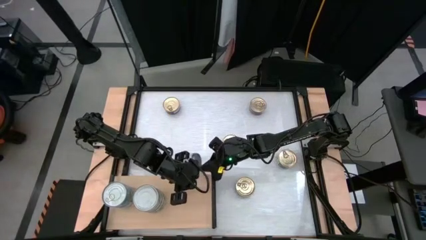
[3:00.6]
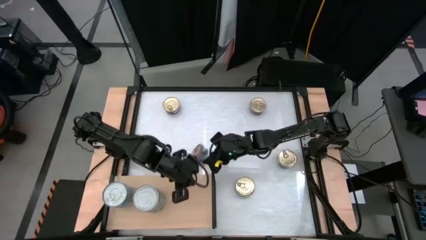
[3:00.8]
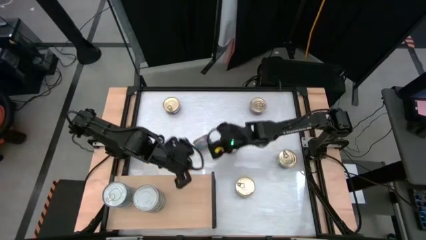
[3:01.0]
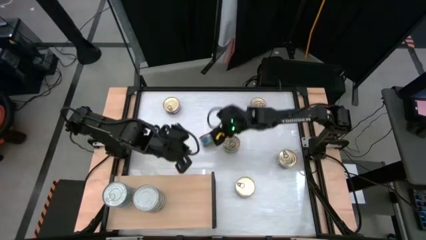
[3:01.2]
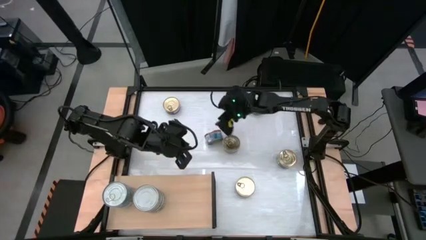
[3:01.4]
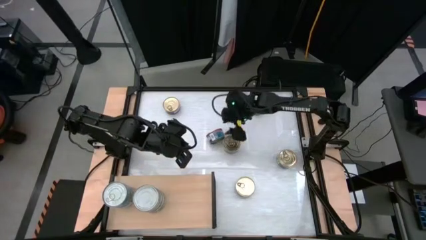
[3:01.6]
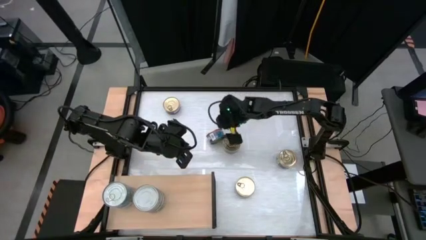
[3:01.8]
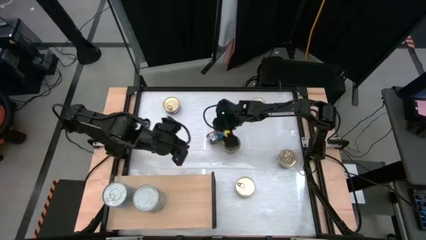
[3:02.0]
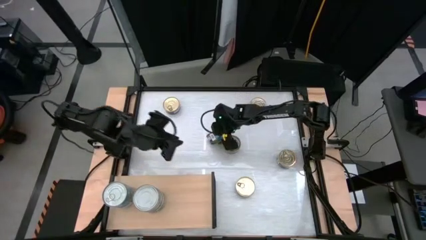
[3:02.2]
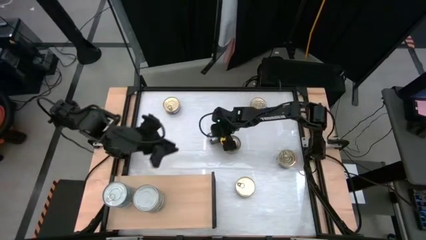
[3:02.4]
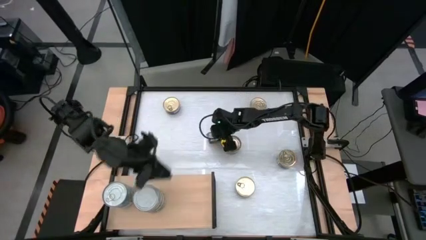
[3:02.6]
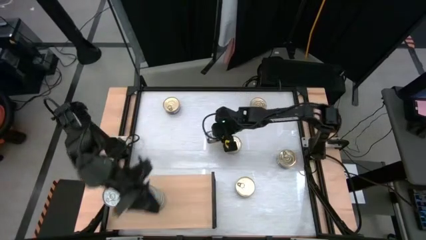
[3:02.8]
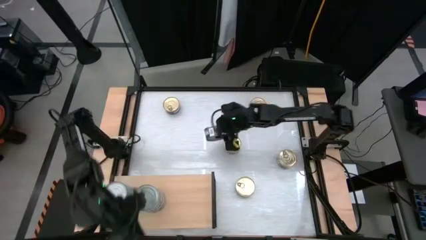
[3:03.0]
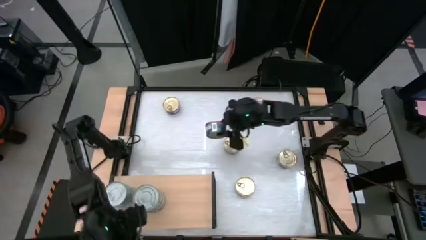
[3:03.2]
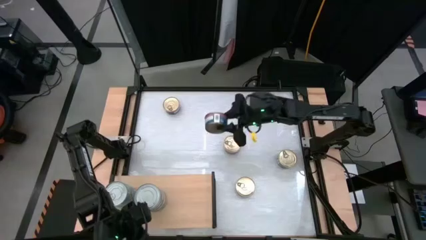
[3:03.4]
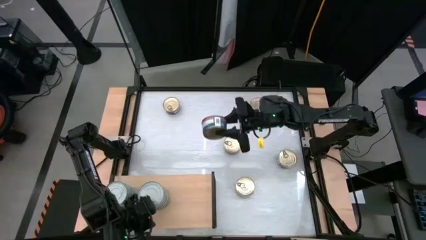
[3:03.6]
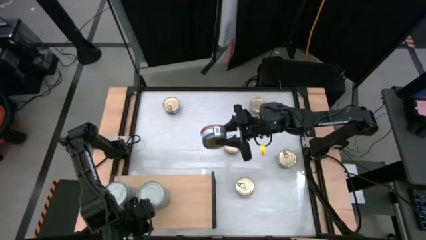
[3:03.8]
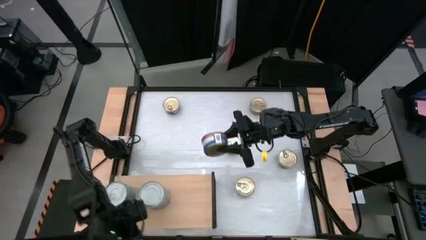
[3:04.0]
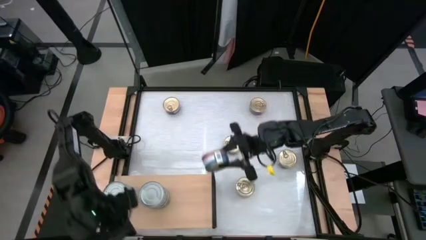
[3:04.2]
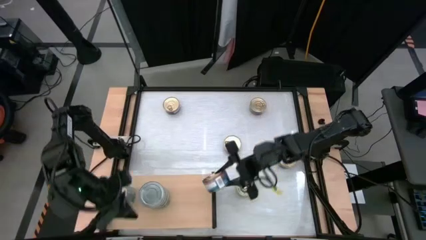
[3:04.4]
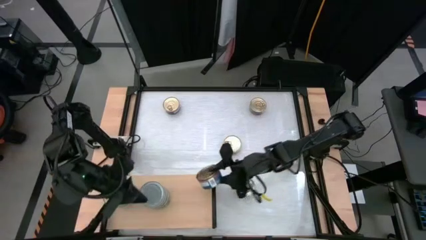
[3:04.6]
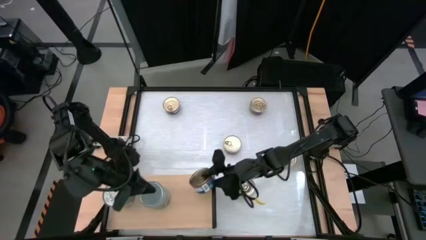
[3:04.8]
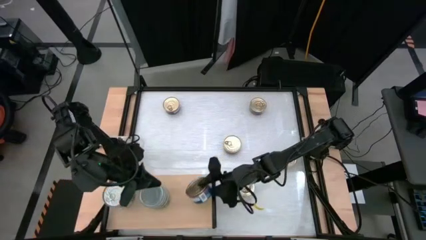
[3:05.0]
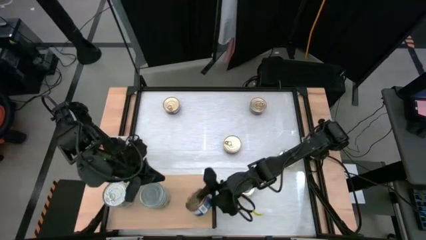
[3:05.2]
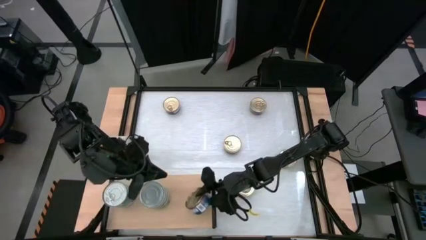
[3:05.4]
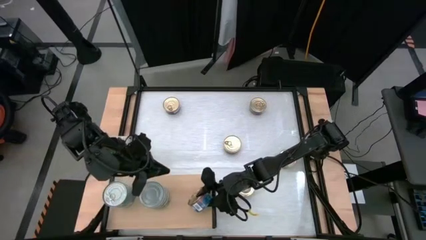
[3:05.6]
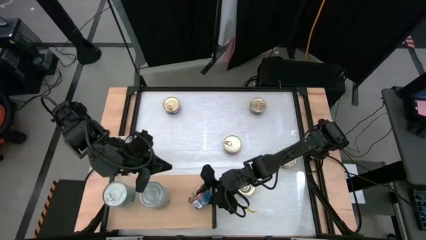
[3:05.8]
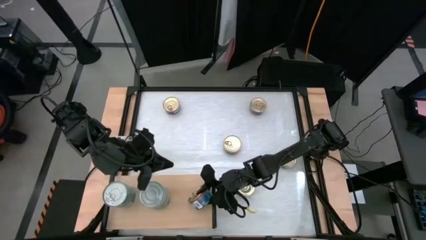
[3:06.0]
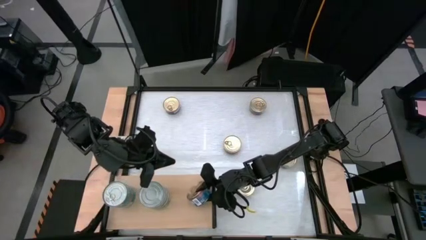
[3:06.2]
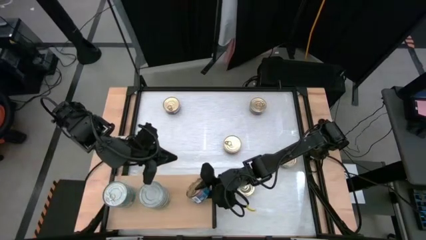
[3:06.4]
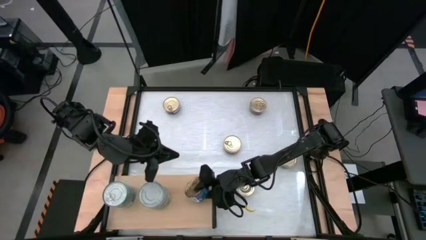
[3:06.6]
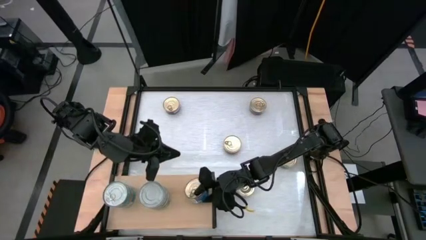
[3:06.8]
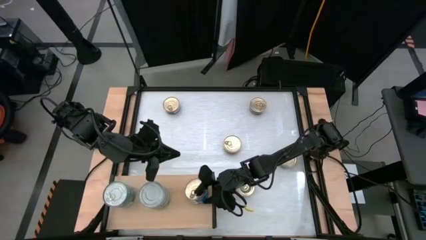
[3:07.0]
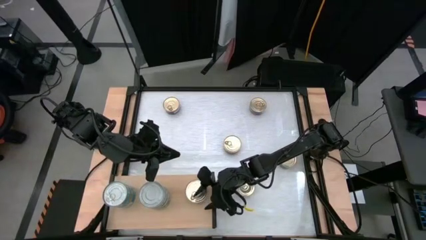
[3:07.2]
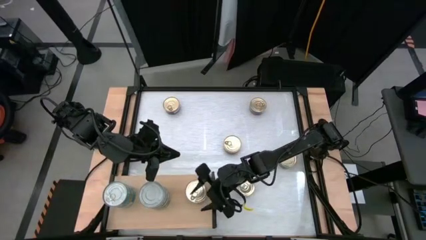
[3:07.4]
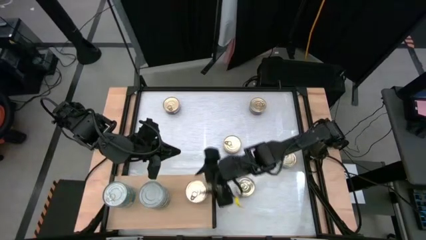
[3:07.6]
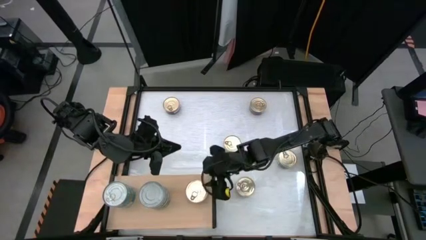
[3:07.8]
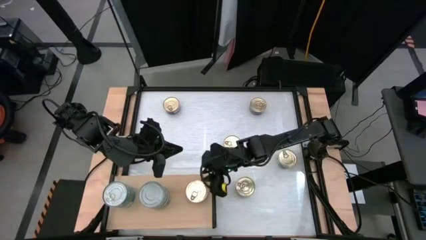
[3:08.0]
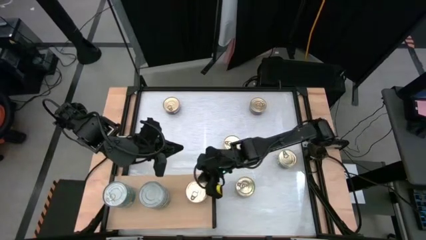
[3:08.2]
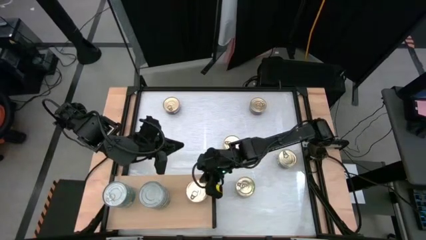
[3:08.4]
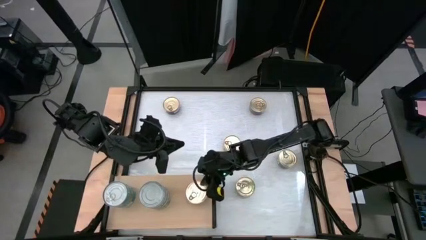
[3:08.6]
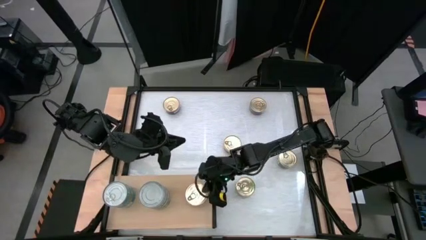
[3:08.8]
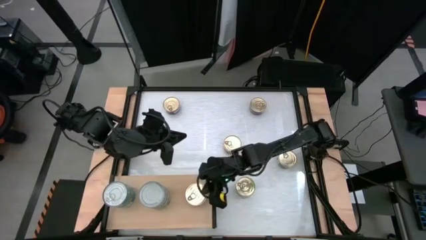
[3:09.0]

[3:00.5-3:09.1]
Task: Stack canned seafood by type on shelf
Put the blue pink tuna can on the shelf

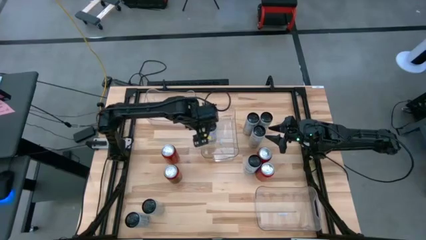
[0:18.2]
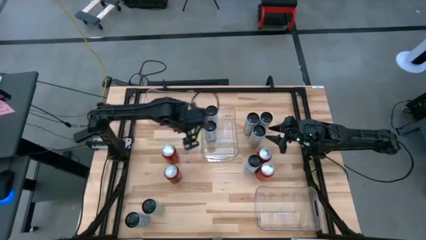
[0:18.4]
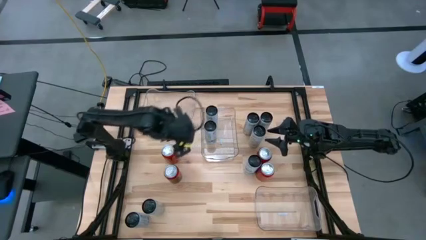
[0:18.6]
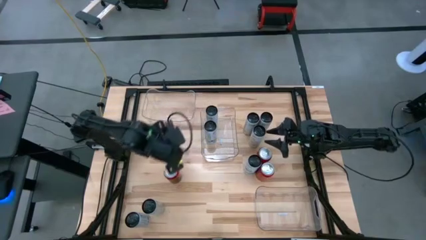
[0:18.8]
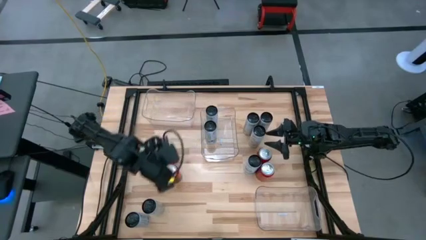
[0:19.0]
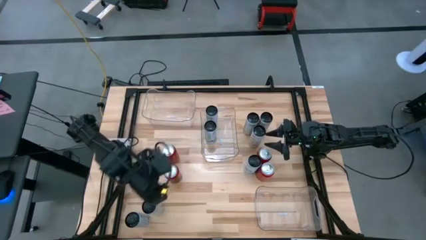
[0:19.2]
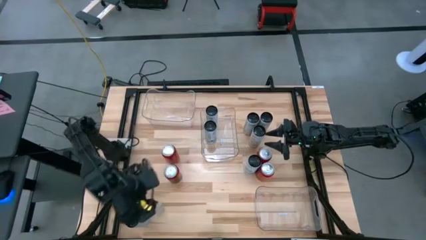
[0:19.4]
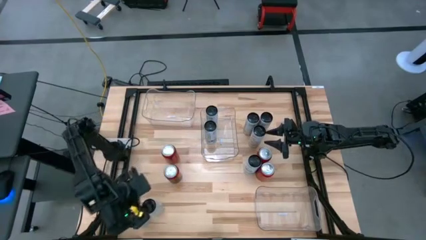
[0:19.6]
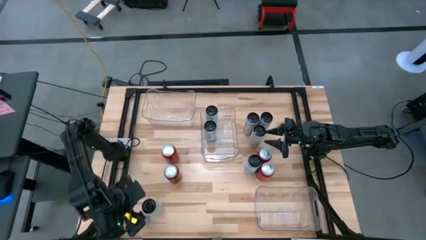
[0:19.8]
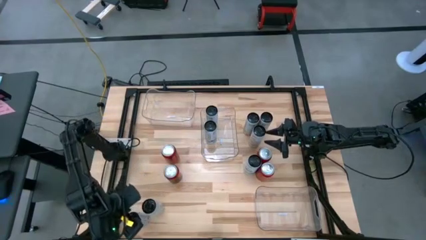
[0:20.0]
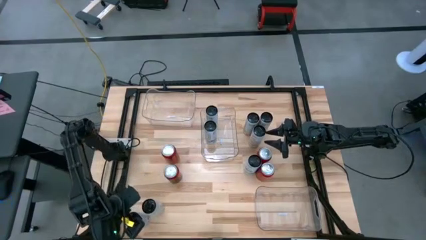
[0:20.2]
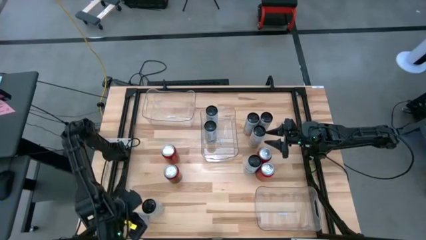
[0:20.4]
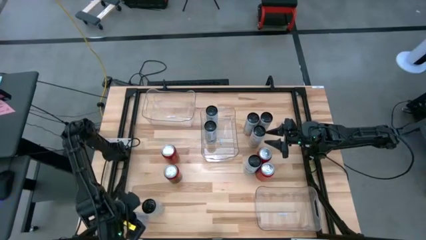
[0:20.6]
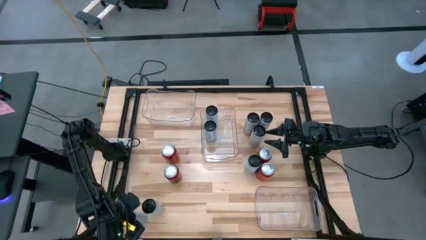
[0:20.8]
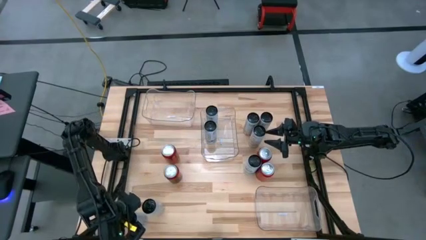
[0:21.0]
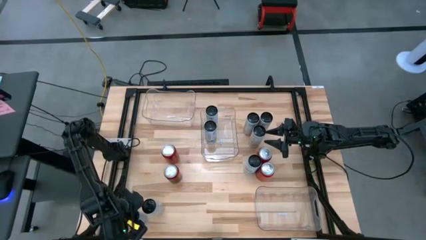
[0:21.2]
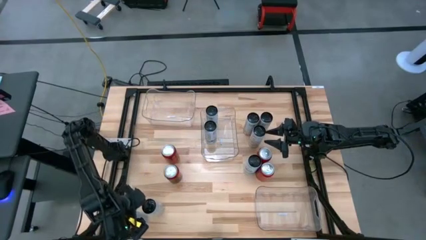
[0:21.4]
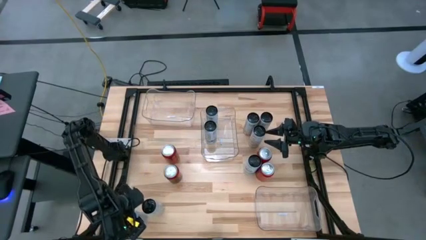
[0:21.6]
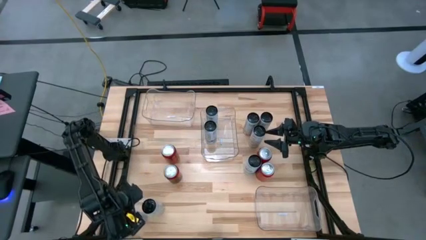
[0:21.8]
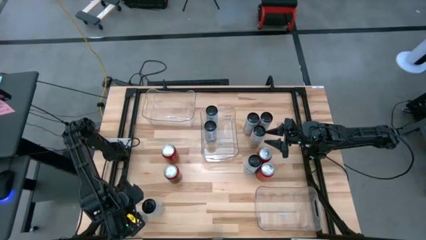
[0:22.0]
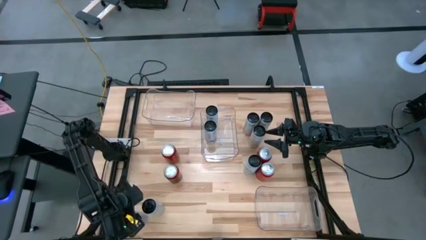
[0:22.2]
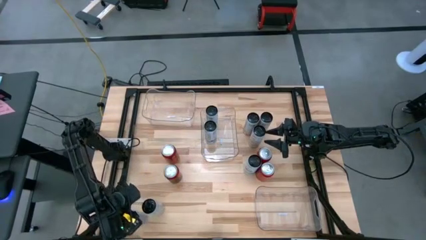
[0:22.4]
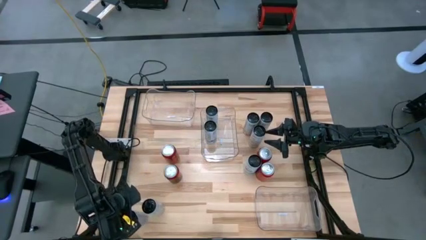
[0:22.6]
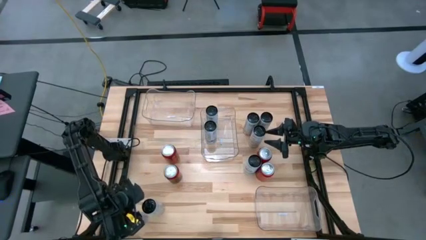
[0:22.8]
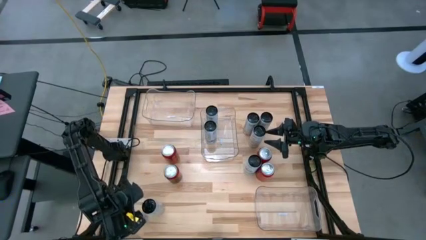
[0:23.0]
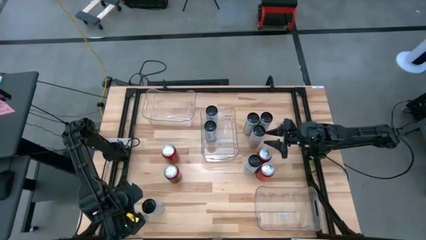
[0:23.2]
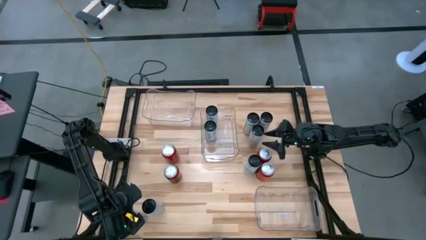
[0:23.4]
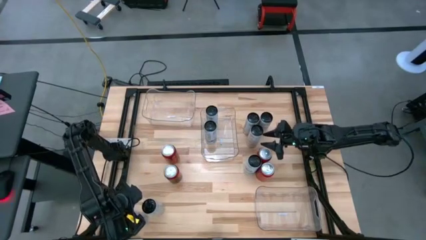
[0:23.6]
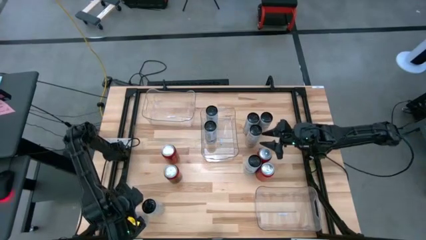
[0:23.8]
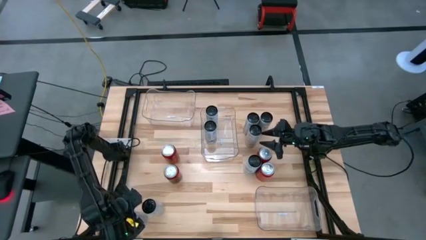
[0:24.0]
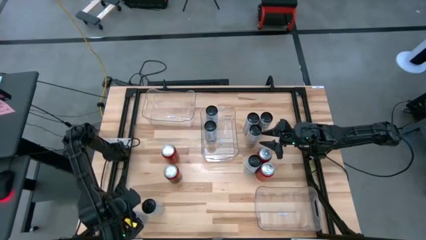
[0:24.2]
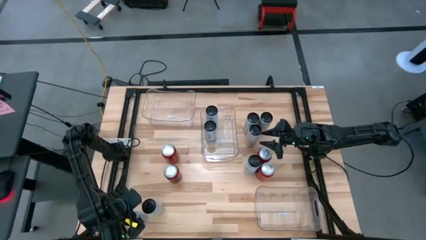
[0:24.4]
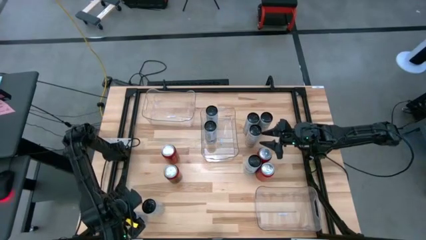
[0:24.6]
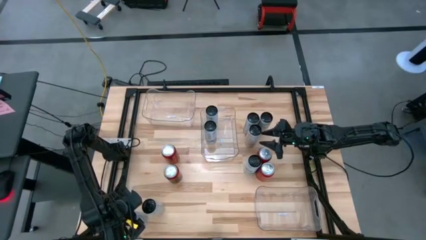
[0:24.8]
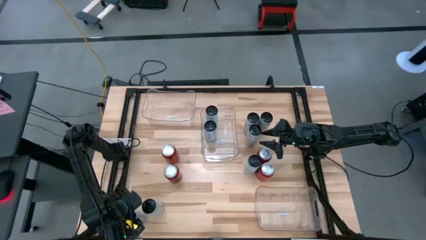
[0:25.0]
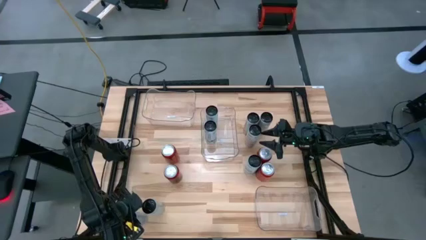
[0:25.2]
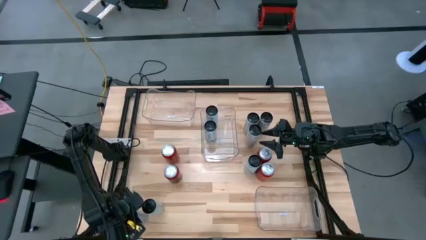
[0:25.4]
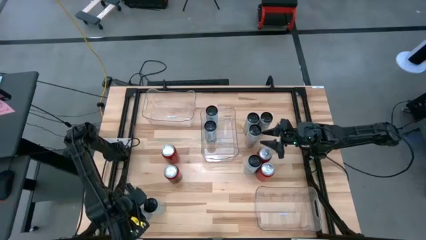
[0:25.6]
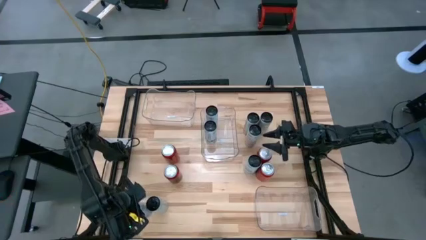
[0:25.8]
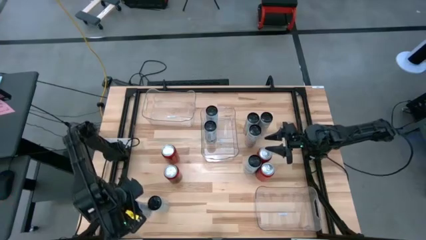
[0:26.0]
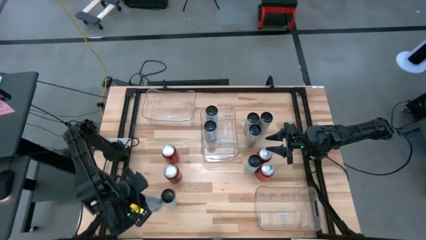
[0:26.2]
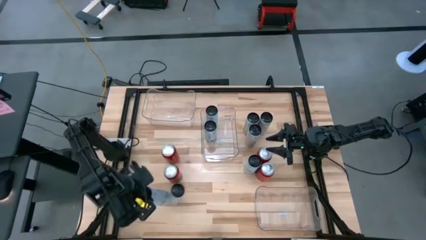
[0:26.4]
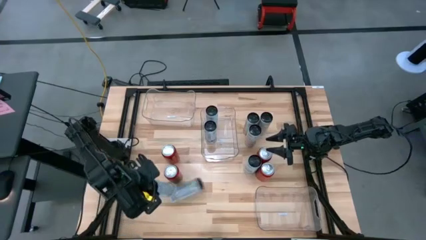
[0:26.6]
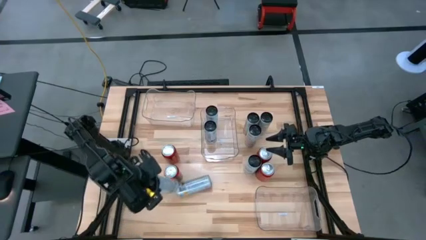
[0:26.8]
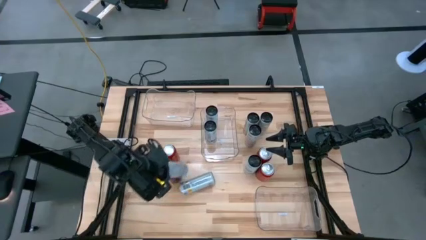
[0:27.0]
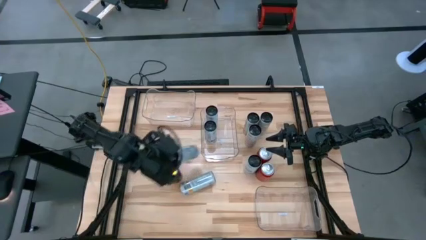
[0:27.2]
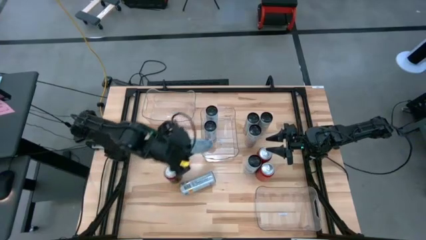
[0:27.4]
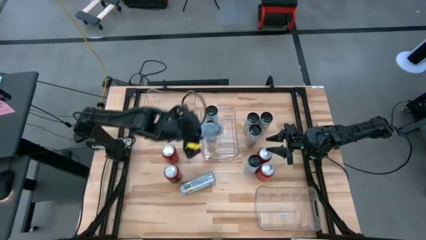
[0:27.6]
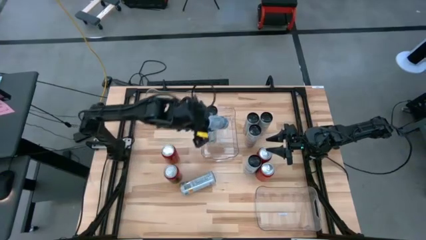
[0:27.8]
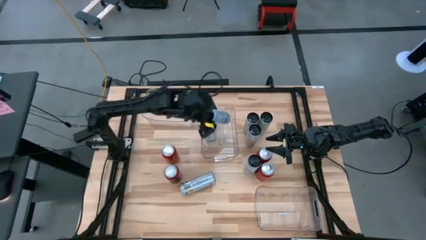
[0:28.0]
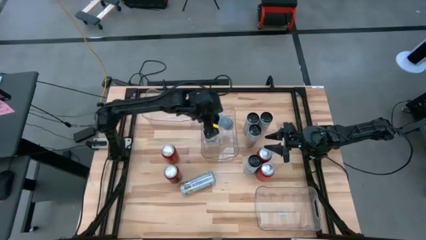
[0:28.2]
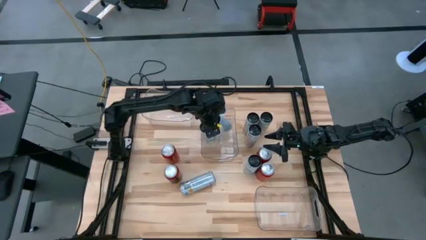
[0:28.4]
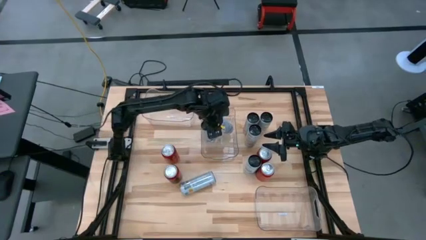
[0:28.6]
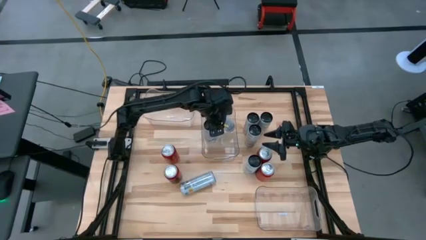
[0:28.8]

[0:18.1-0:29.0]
Task: Sort soda cans
Put the white blue soda can into the middle transparent bin
